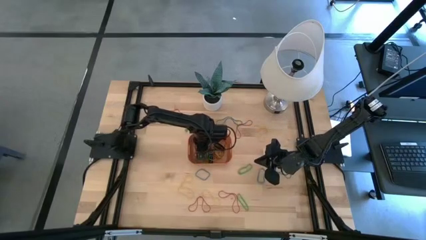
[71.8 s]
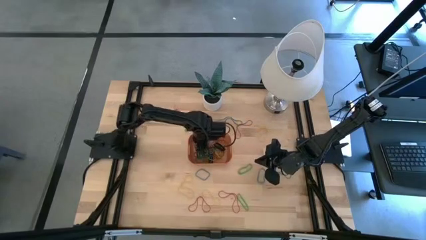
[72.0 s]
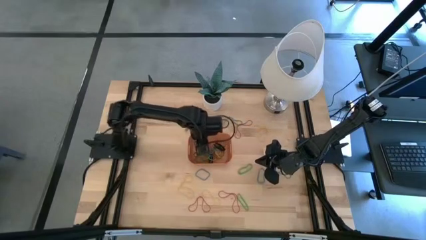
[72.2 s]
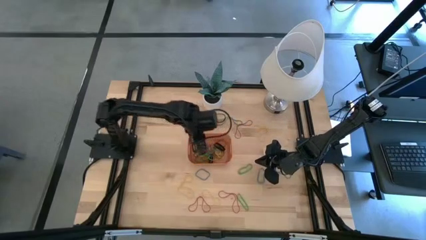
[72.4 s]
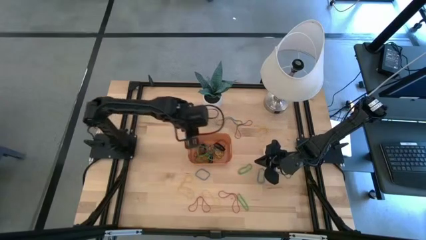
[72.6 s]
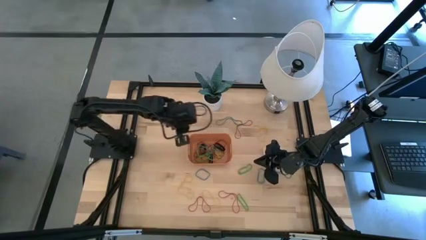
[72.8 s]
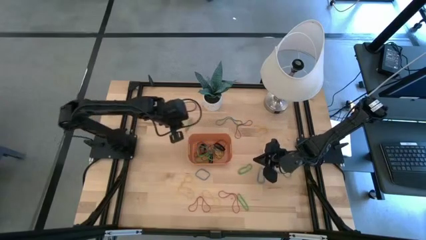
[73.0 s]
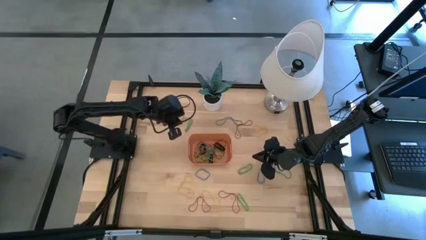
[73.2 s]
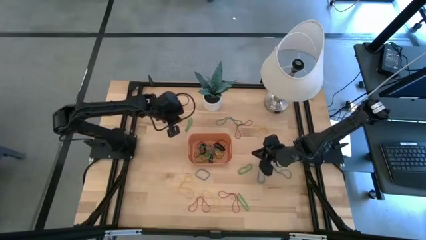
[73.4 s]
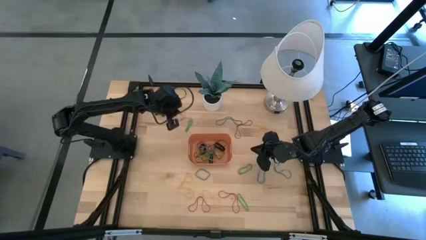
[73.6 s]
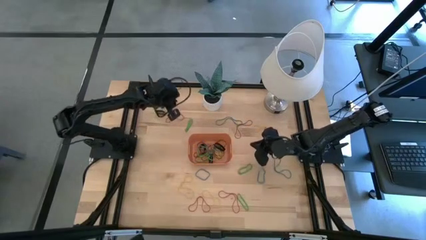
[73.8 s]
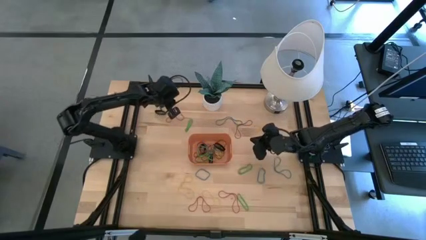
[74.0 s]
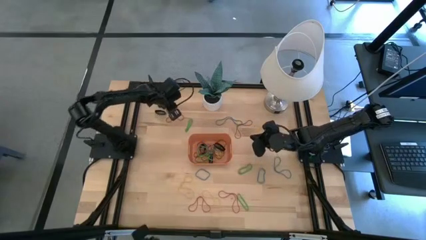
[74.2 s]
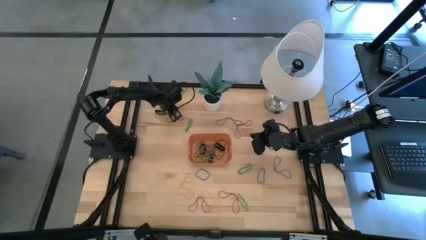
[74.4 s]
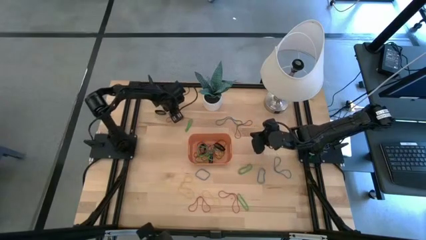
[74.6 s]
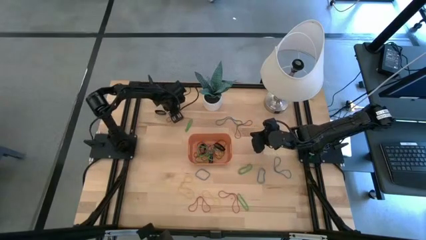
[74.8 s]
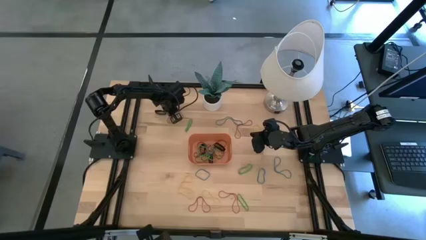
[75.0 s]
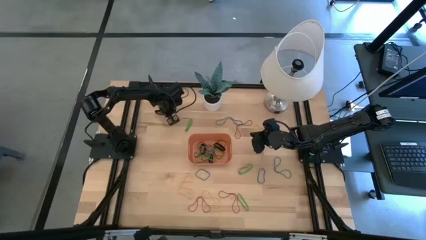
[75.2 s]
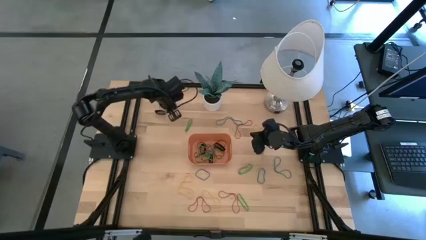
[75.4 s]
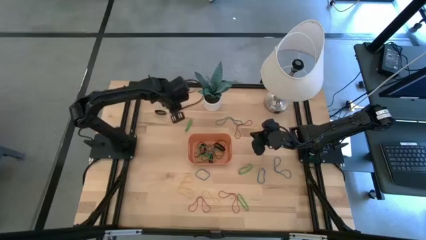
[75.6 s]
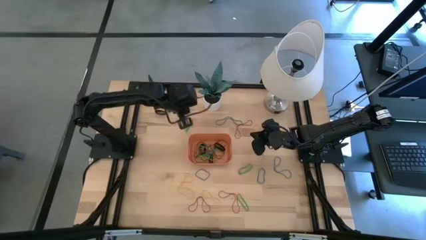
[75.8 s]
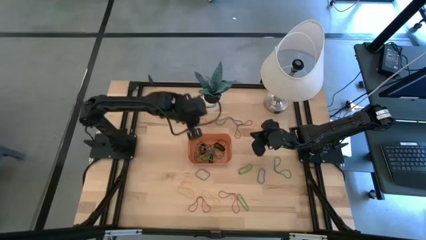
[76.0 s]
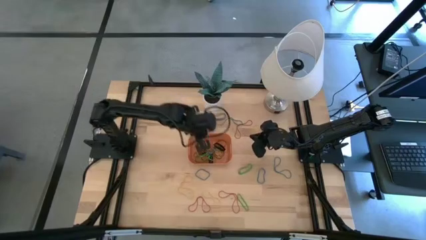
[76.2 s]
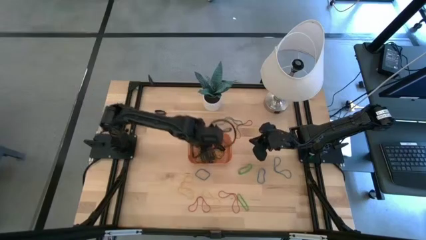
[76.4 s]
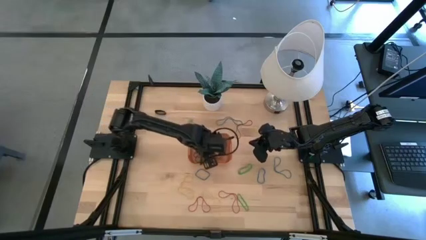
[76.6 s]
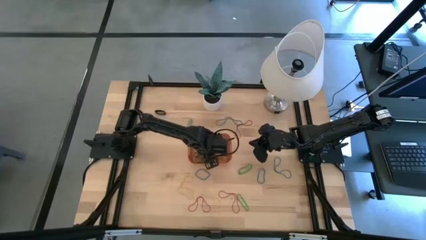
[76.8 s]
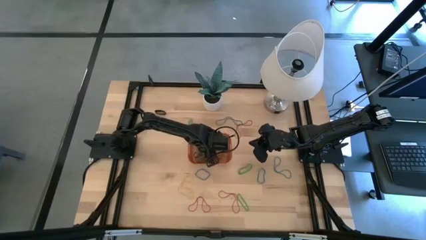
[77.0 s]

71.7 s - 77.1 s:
Task: Pick and place rubber bands into bin
Put the red rubber band into the orange bin

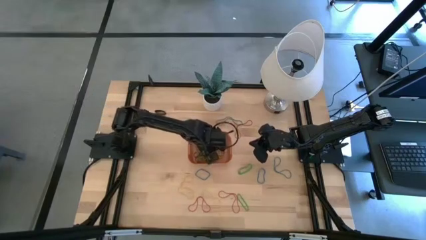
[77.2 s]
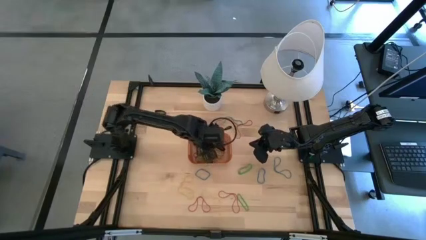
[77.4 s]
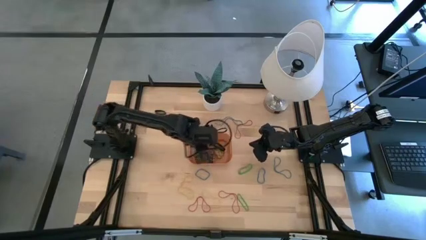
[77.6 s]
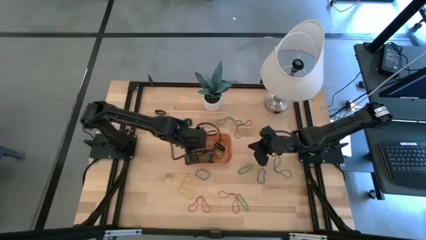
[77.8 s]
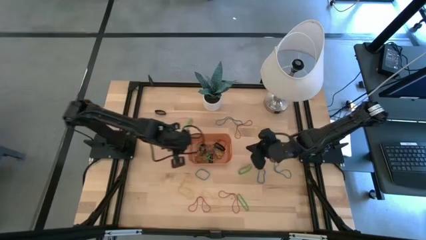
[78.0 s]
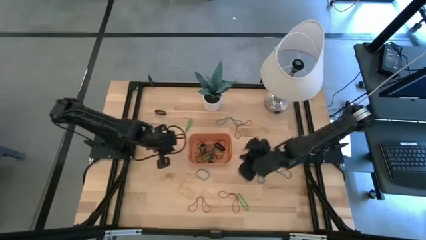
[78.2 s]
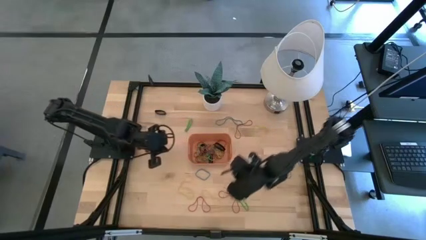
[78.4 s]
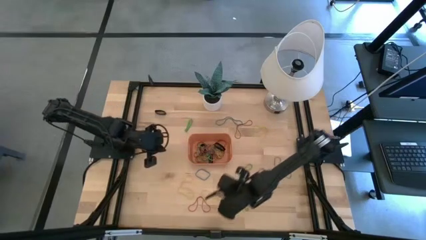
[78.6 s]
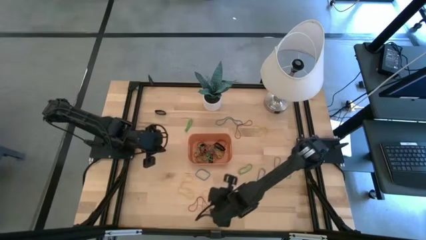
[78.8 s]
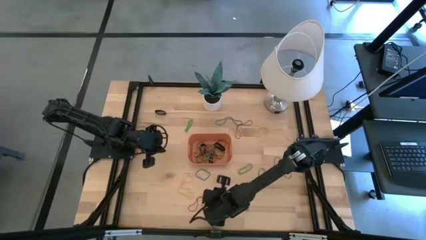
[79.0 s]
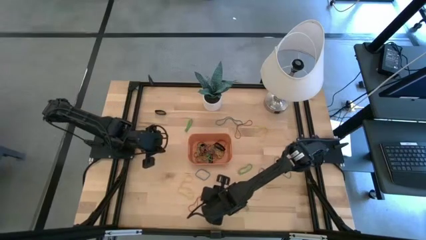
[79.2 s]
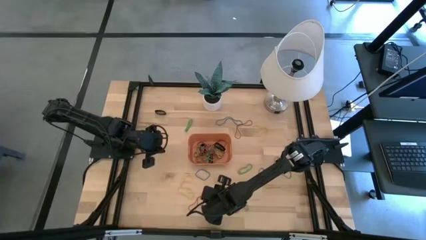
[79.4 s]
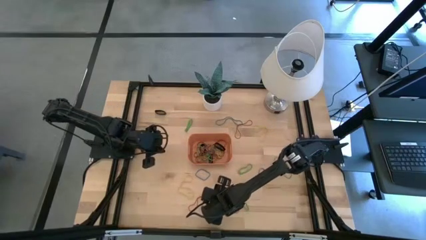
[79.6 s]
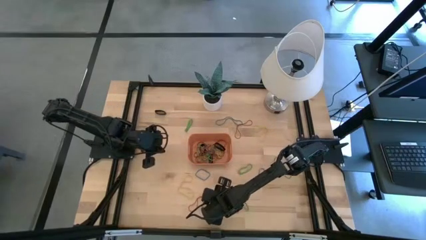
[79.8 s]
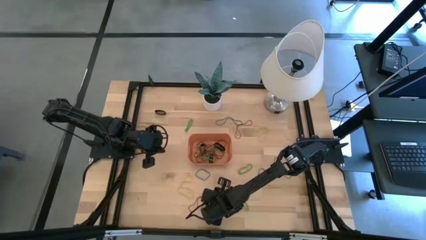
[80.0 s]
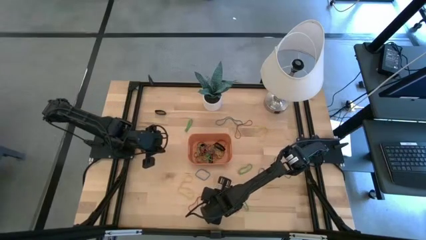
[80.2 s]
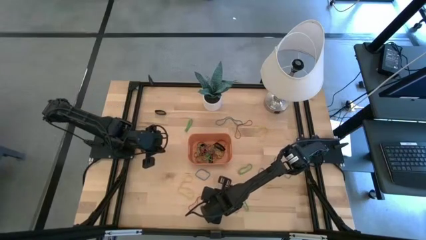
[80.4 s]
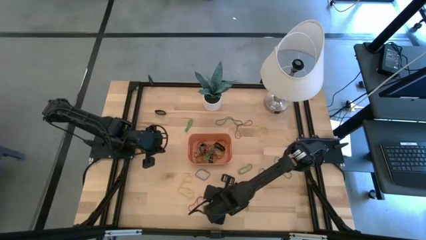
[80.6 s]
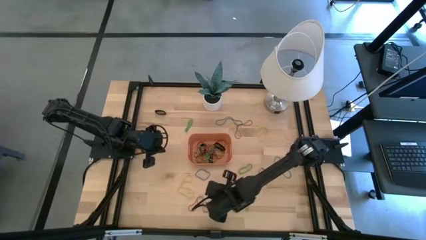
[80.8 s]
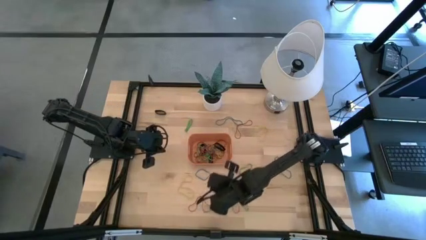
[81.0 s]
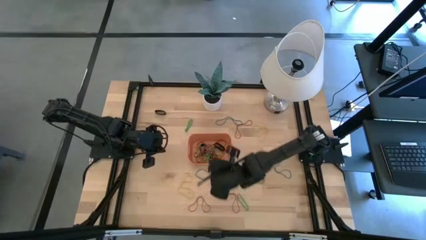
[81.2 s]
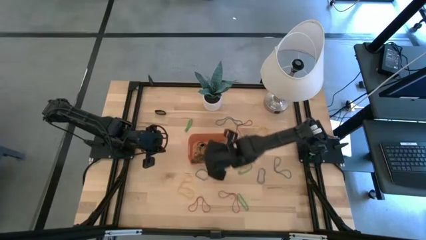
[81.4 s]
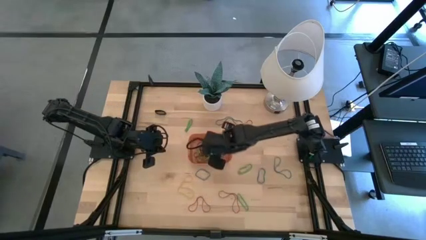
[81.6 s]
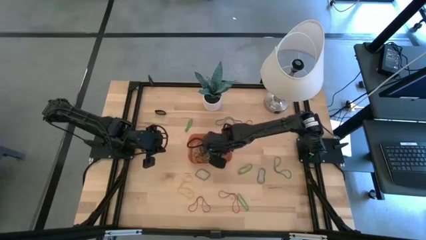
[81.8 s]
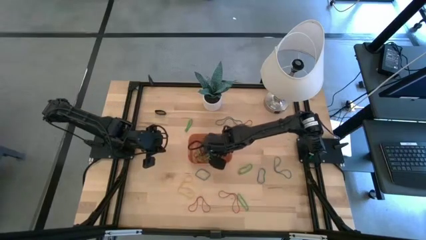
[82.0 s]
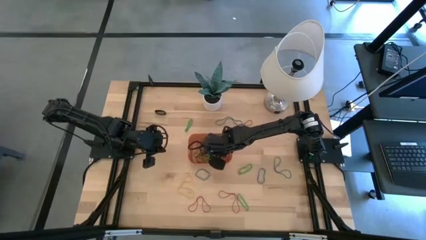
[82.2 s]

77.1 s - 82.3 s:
Put the yellow rubber band into the orange bin

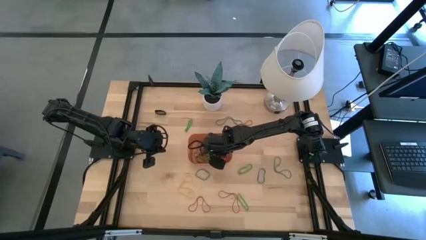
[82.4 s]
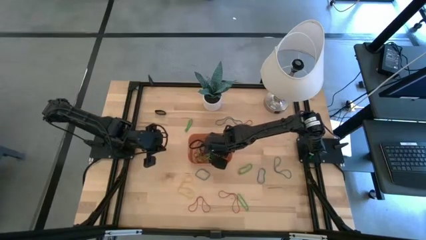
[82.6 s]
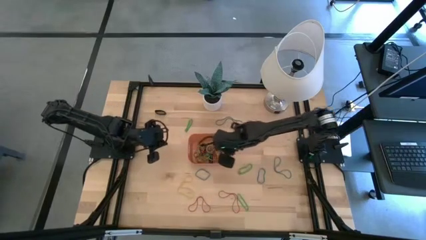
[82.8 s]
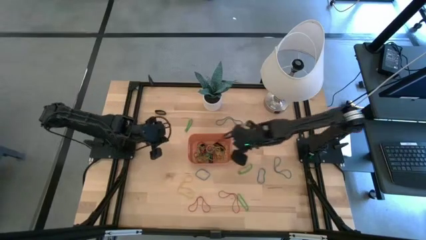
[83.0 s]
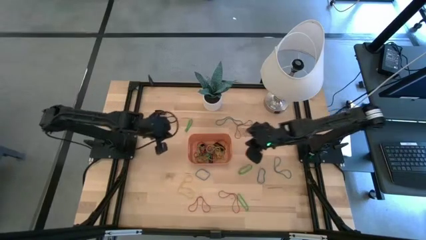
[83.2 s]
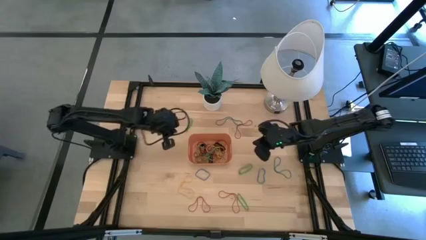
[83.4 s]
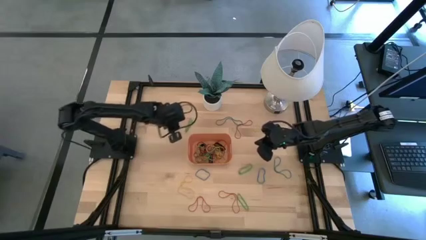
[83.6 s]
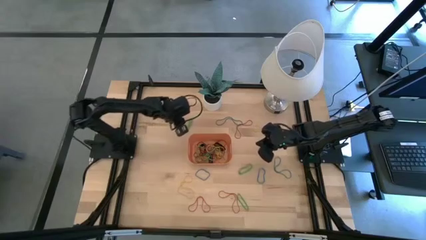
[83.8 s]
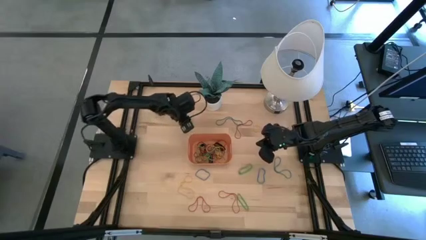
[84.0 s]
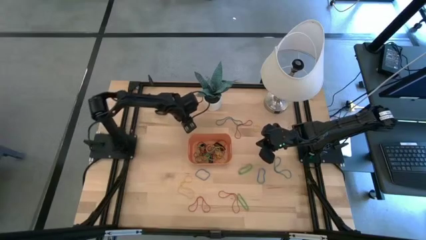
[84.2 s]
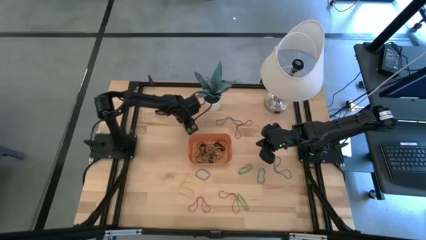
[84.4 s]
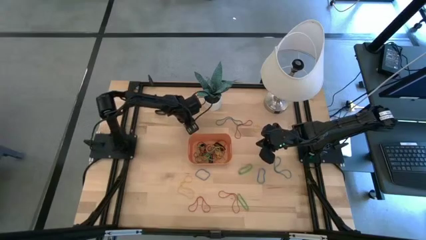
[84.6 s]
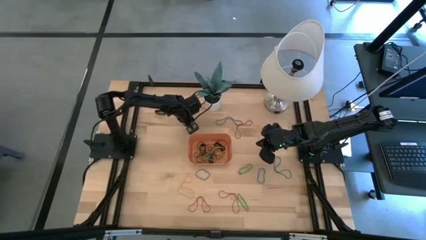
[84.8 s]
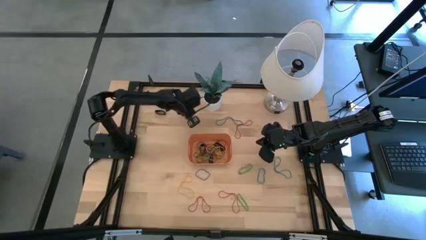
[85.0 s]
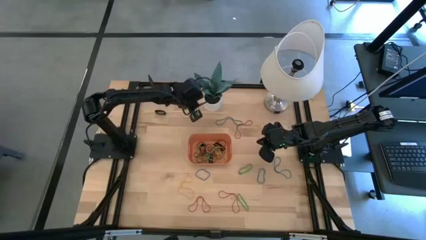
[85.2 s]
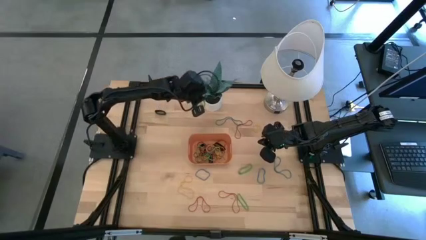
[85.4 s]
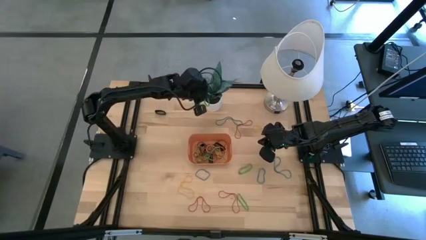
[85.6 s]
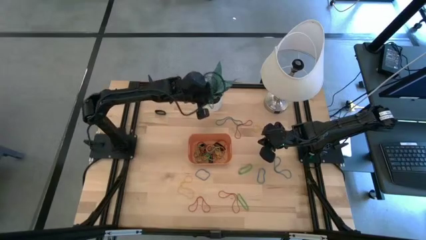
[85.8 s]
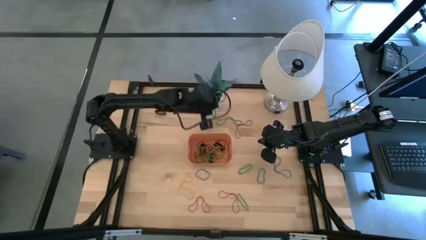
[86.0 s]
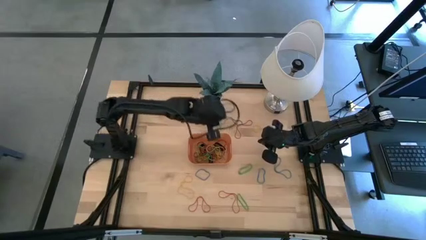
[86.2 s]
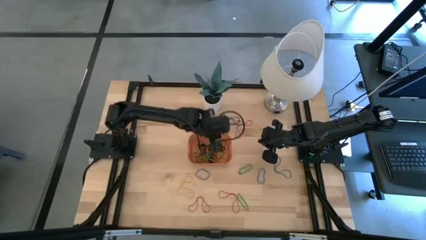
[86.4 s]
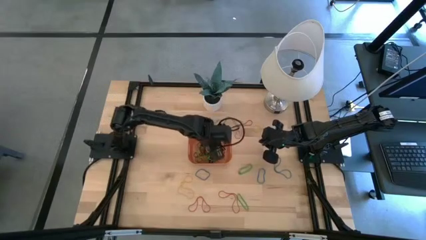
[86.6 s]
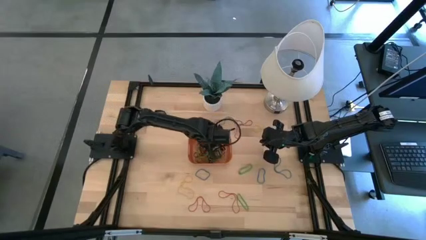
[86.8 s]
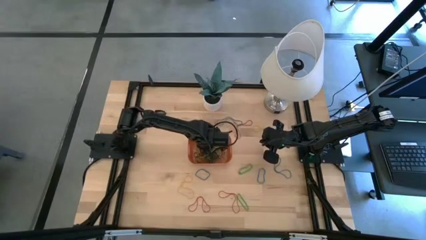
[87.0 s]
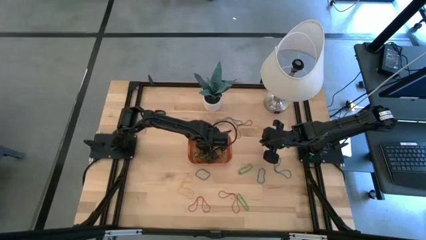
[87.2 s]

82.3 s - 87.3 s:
Put the green rubber band into the orange bin

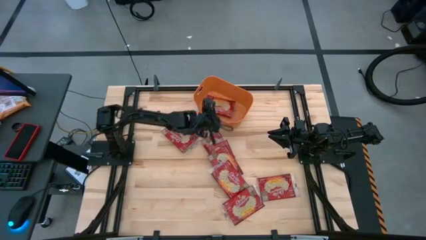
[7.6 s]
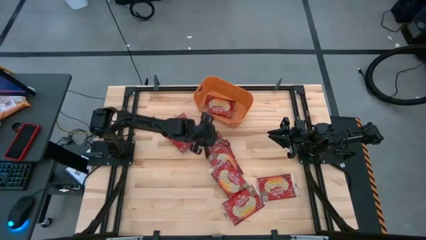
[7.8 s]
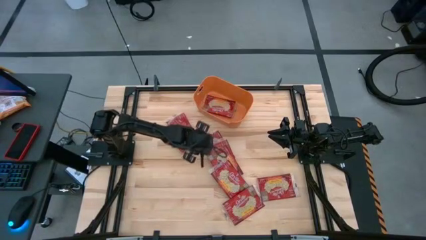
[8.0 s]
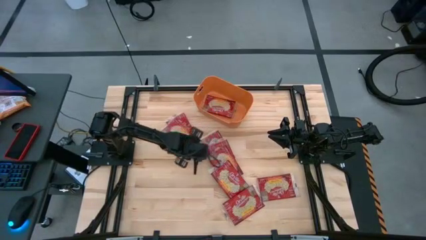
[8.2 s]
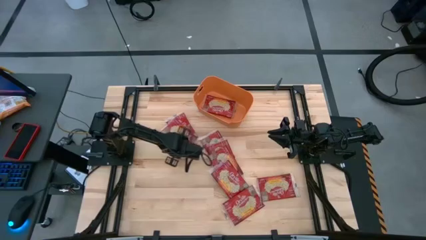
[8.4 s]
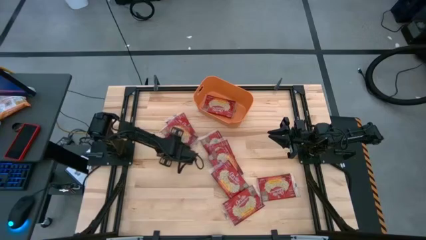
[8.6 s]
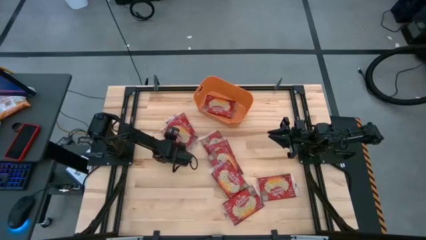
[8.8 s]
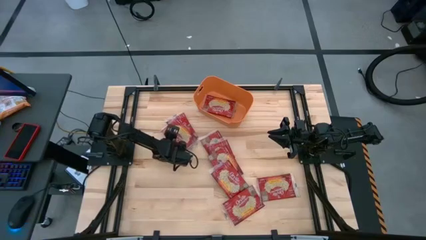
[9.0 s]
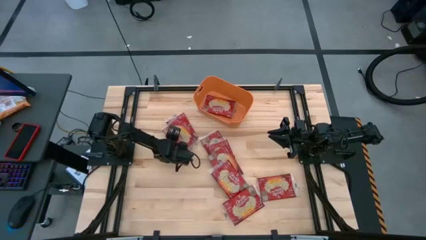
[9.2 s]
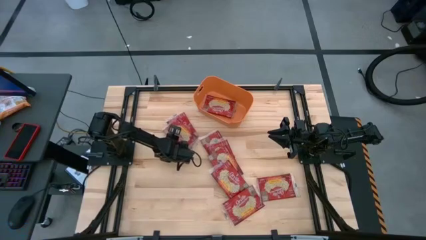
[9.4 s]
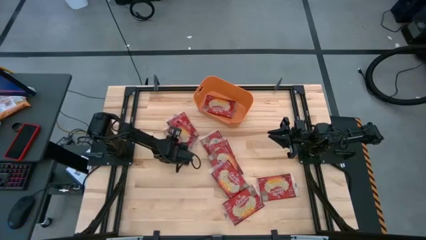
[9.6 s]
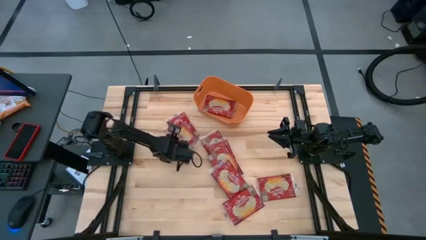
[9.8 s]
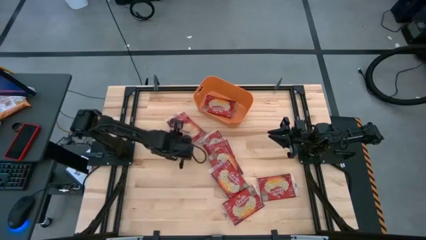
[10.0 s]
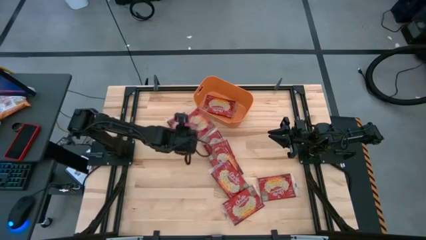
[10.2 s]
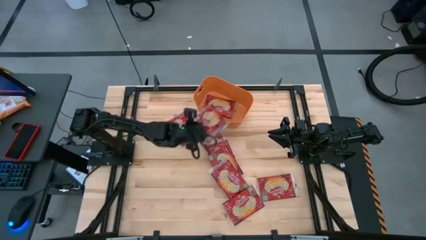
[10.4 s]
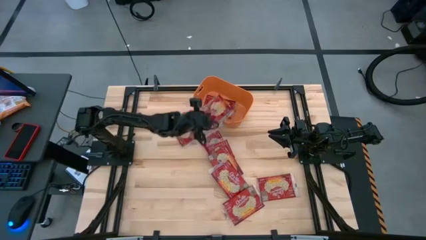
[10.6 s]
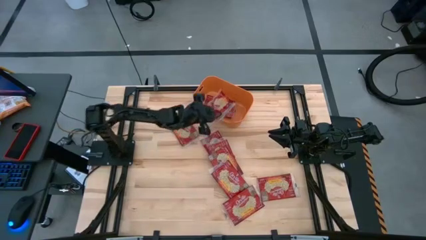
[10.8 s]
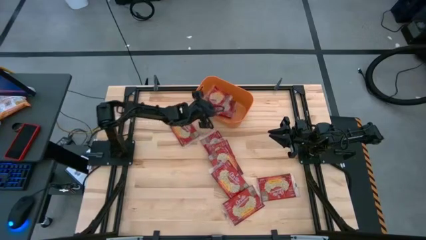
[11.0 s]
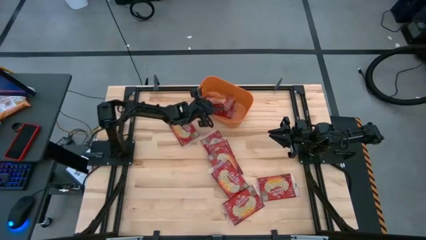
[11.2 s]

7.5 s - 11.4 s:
Task: Sort popcorn bags into baskets
Put the red popcorn pack into the orange bin
